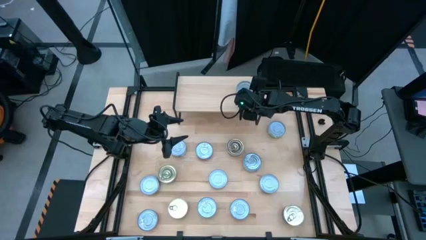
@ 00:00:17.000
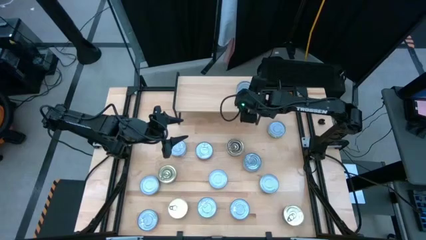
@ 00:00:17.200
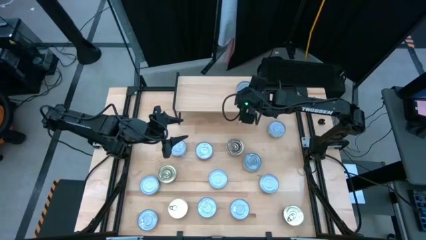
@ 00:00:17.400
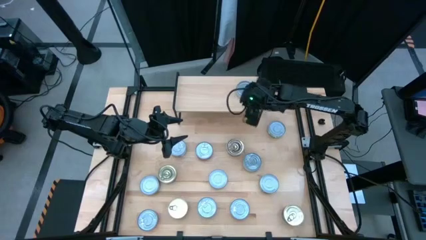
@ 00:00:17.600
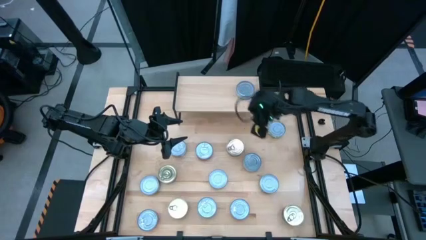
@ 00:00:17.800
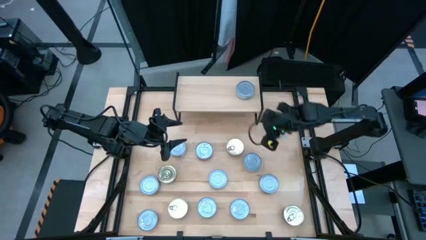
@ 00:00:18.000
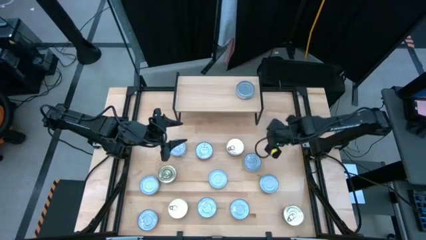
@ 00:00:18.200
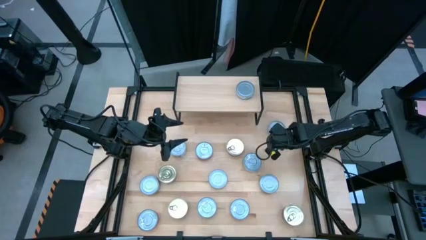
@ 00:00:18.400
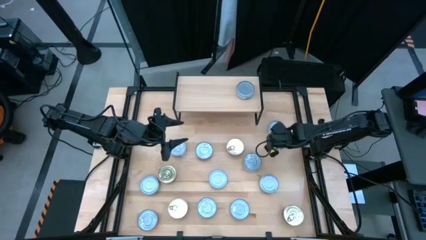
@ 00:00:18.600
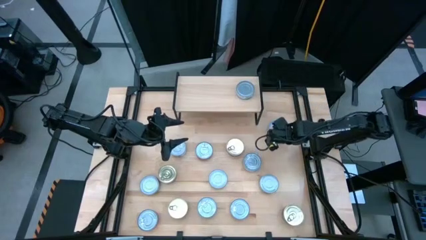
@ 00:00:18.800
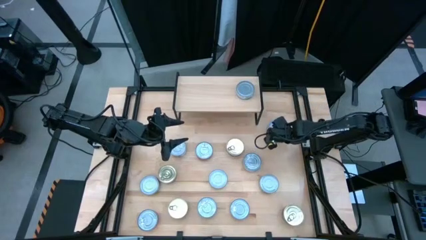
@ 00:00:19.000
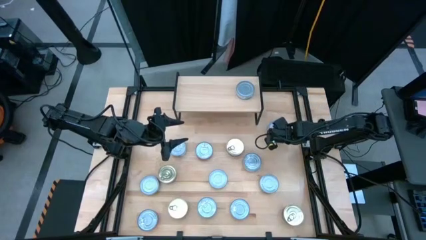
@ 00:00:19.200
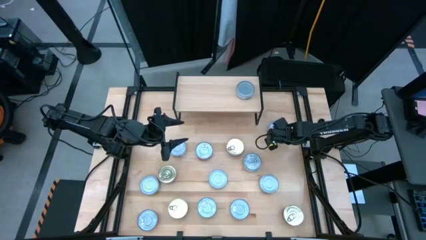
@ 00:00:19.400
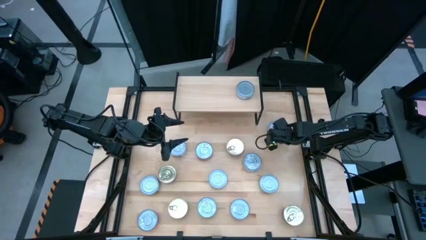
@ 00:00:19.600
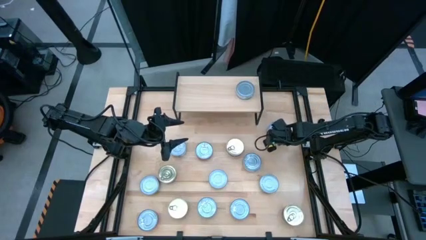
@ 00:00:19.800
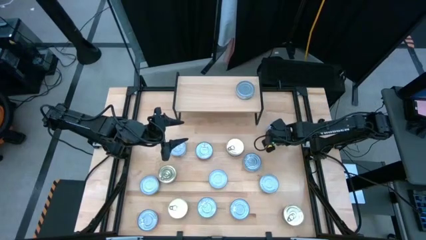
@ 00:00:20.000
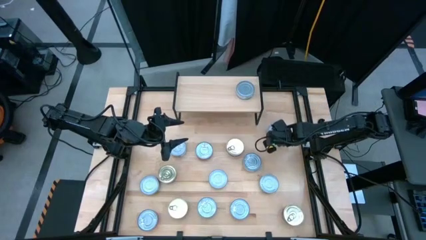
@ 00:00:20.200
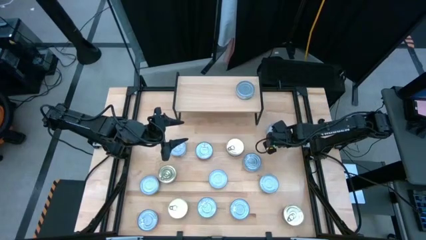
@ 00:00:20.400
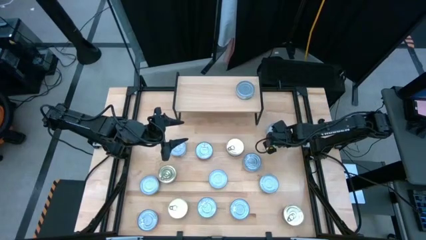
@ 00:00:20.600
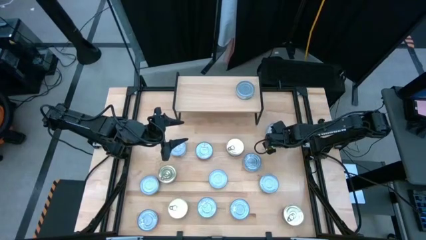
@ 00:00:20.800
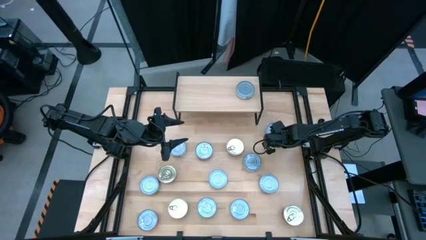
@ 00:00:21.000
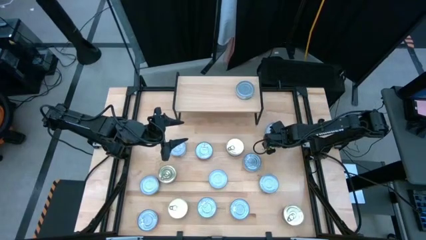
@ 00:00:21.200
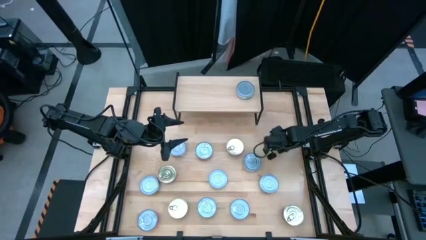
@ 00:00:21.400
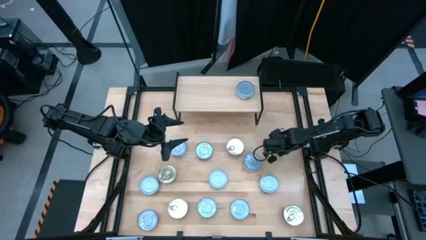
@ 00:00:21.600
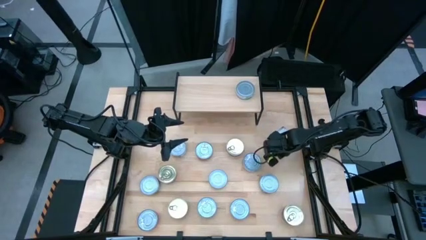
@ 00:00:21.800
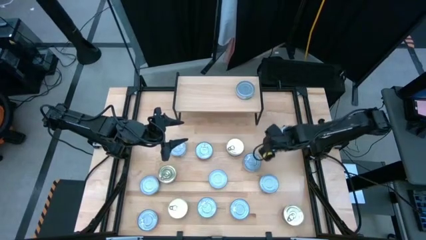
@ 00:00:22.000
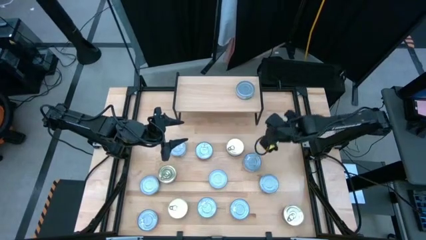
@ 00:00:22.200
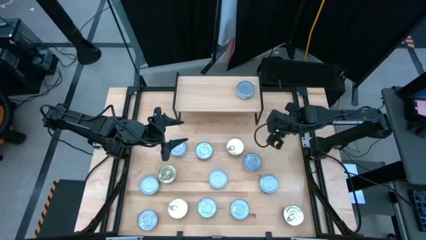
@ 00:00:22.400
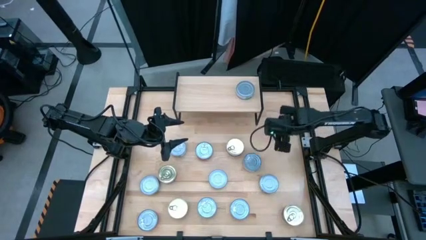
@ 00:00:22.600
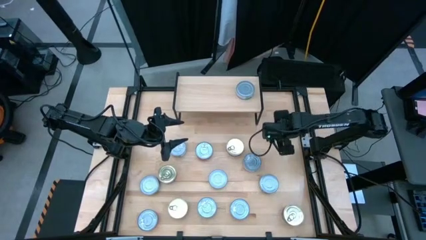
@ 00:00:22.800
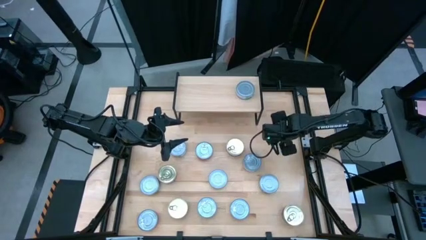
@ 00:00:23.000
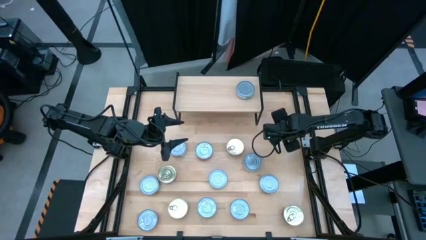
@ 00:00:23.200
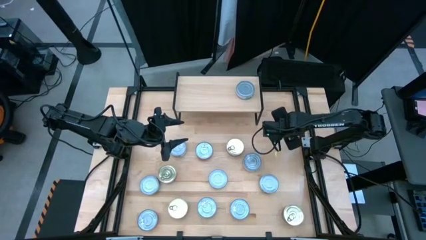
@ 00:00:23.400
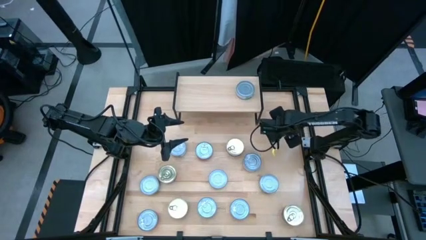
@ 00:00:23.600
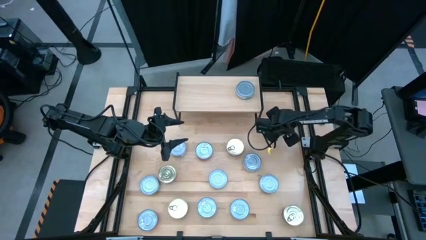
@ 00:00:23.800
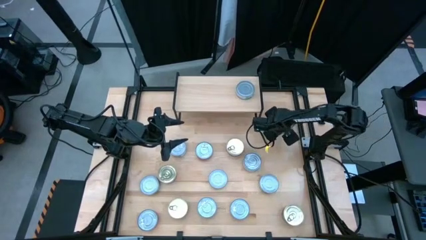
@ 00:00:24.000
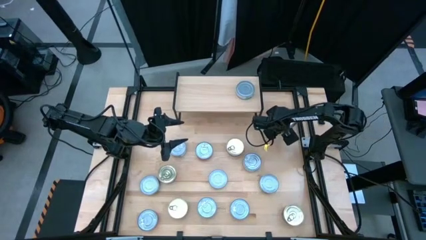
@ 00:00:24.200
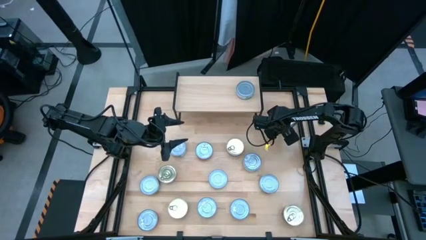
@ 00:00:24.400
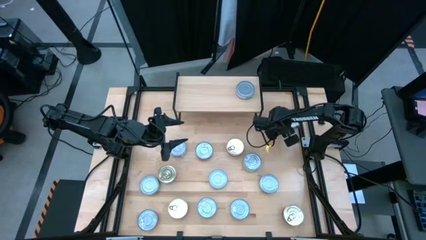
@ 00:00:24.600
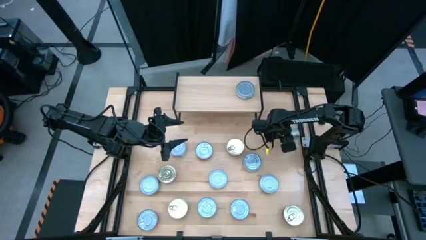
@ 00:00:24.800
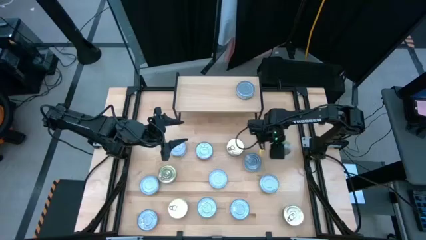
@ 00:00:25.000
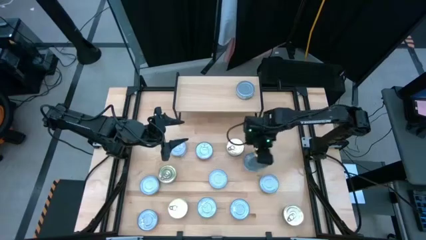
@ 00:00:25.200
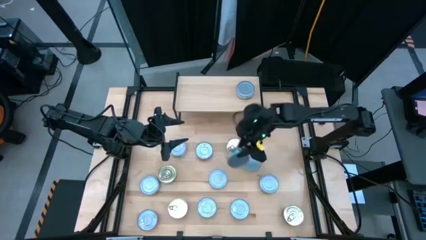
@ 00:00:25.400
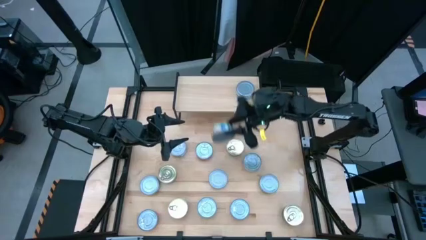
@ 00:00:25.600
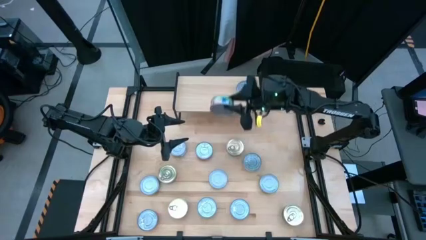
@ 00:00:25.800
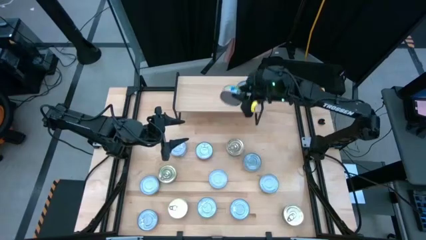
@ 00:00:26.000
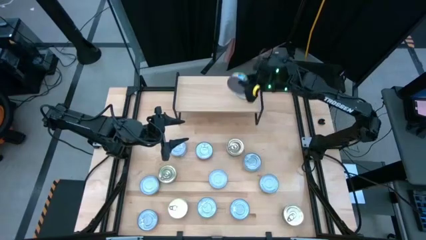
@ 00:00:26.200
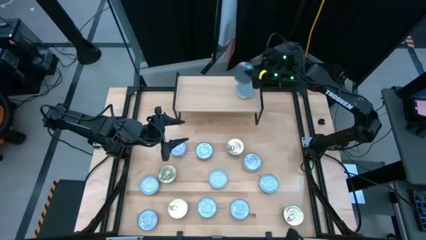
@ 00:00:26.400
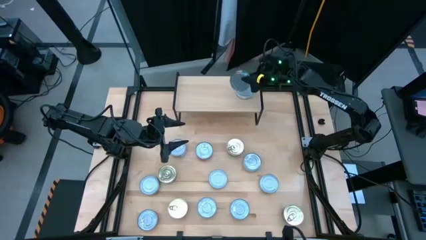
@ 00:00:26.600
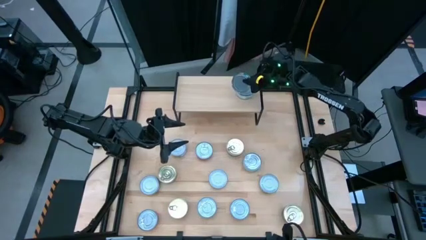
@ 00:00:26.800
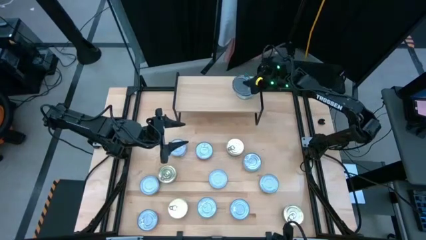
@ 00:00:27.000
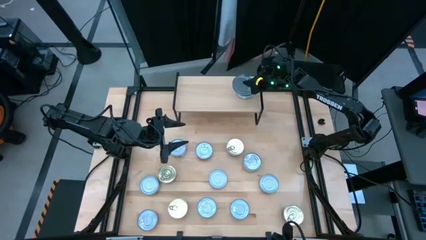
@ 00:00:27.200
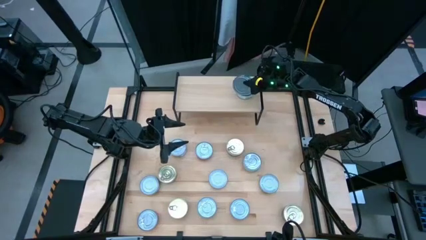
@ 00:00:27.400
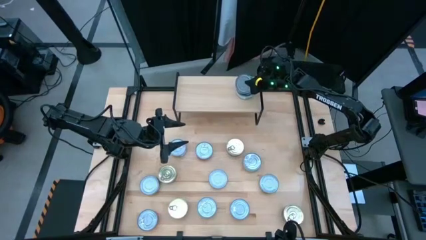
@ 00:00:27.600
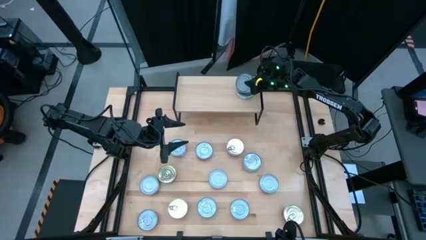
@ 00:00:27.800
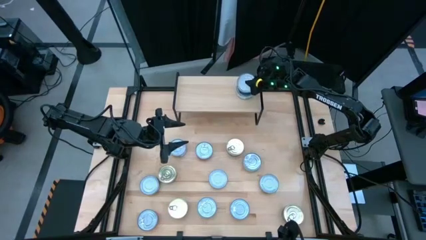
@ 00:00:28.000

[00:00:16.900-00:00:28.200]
Task: Stack canned seafood by type on shelf
Stack the green tuna can on top of the other green tuna can on the shelf

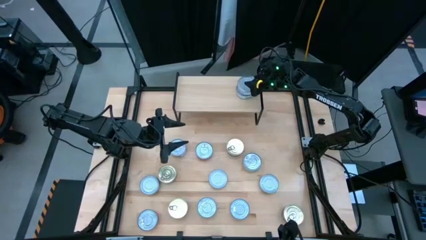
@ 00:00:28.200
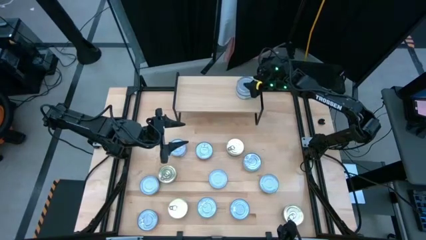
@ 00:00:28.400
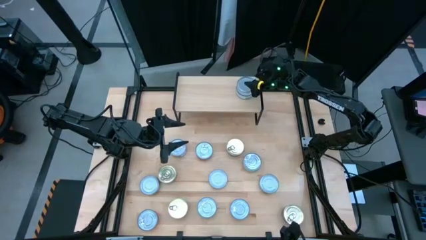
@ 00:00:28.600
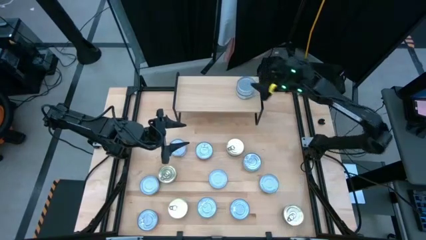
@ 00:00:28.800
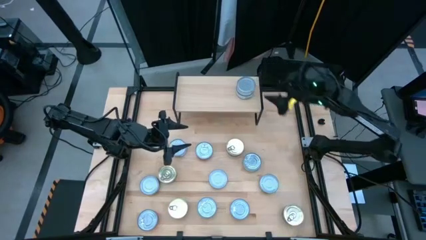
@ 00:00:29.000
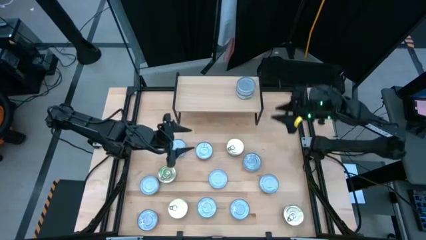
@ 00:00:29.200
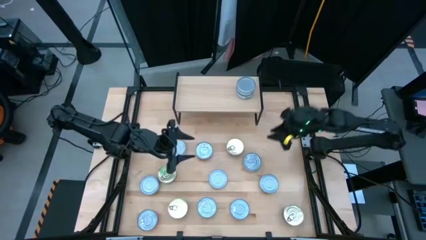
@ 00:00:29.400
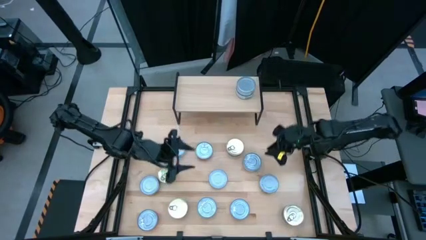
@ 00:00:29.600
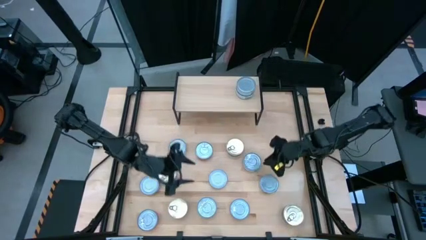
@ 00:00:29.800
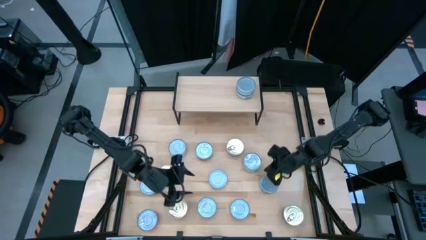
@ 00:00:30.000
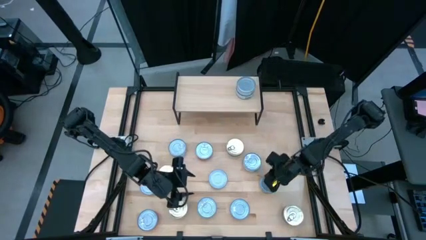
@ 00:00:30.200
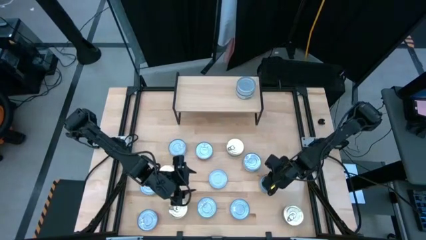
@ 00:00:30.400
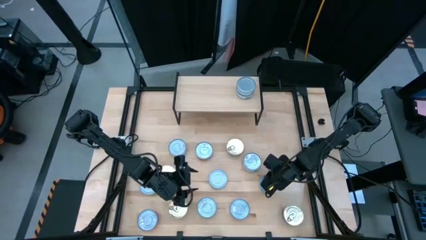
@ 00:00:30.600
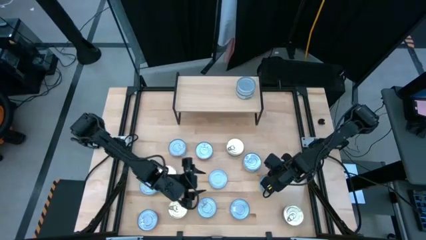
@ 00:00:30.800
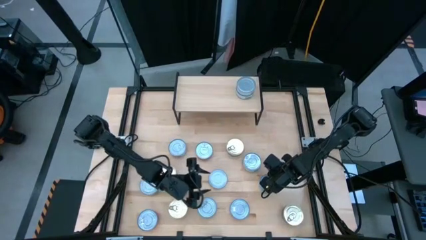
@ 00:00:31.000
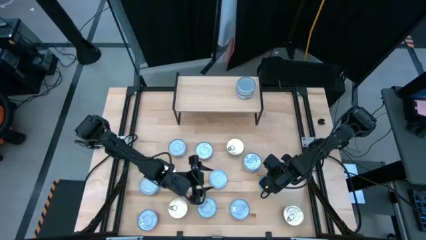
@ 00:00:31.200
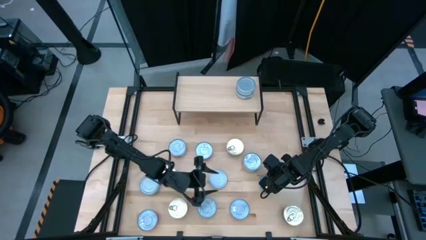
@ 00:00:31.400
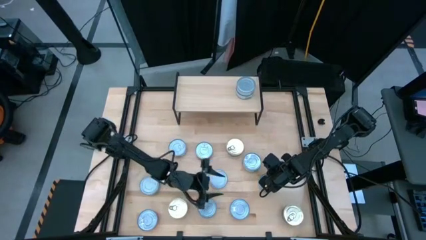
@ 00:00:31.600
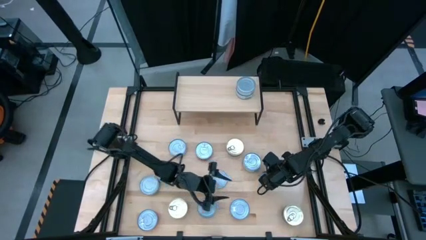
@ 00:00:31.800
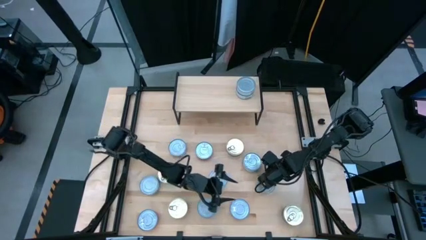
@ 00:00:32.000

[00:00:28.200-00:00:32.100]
Stack the green tuna can on top of the other green tuna cans on the shelf
